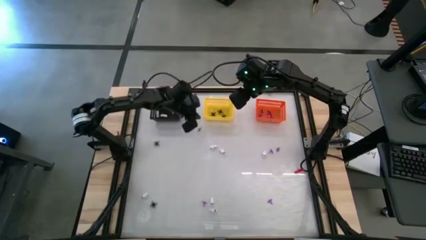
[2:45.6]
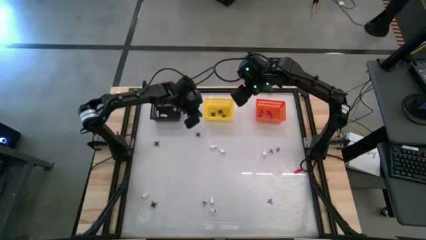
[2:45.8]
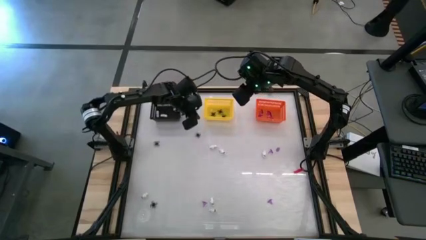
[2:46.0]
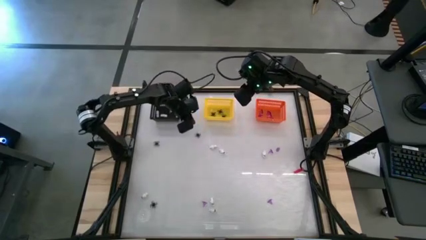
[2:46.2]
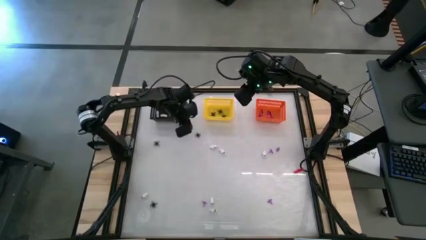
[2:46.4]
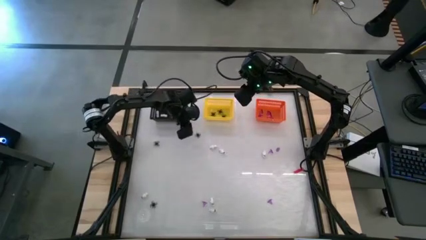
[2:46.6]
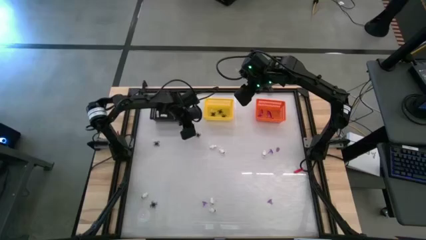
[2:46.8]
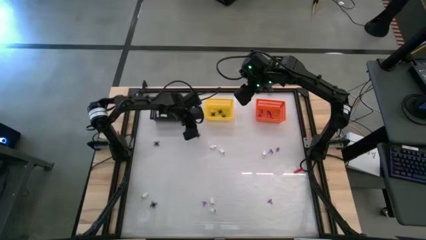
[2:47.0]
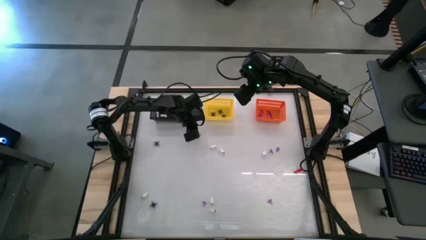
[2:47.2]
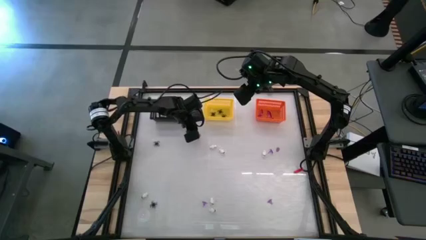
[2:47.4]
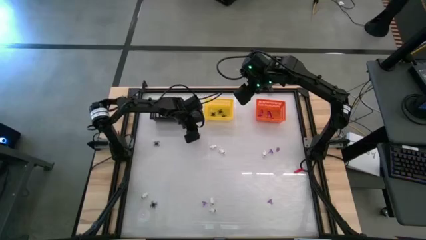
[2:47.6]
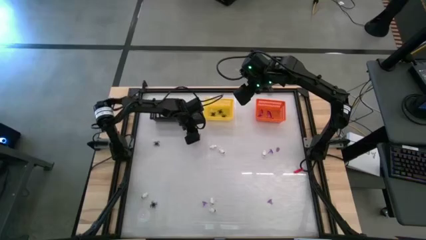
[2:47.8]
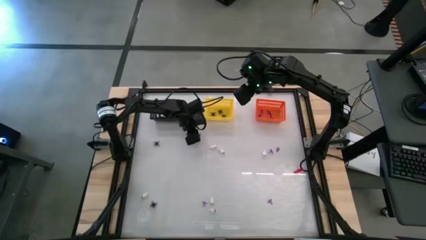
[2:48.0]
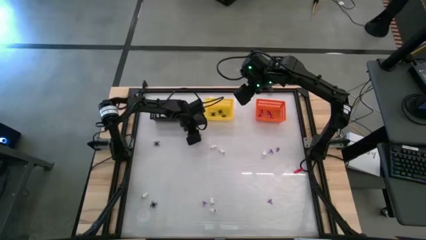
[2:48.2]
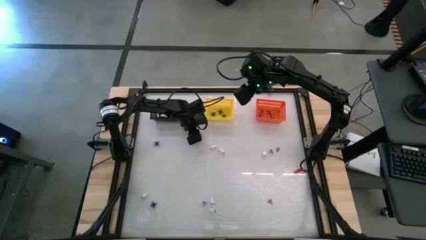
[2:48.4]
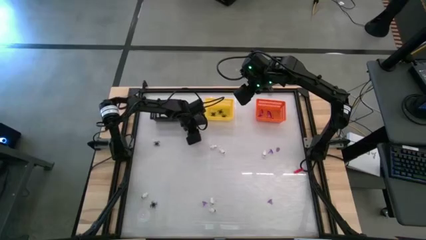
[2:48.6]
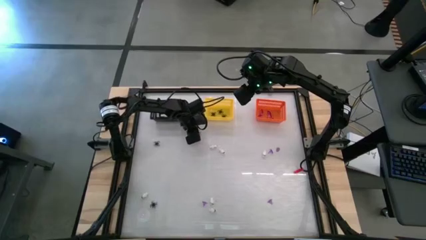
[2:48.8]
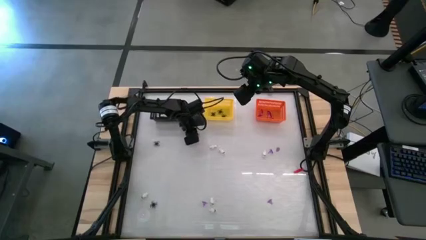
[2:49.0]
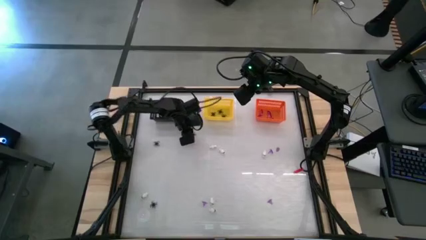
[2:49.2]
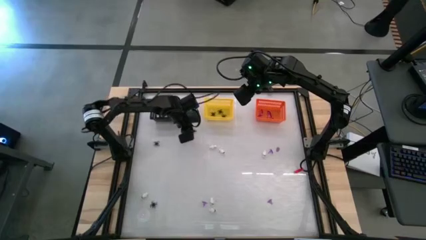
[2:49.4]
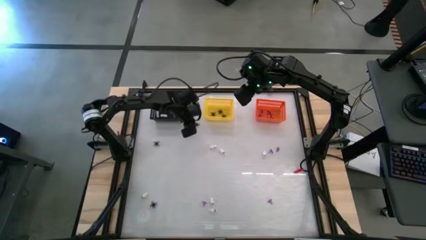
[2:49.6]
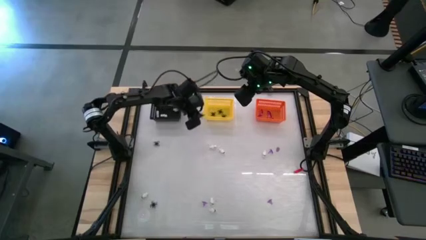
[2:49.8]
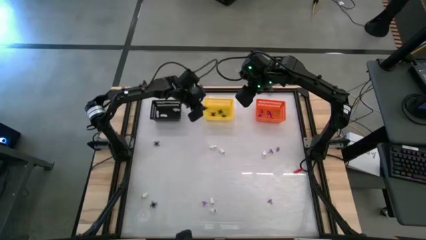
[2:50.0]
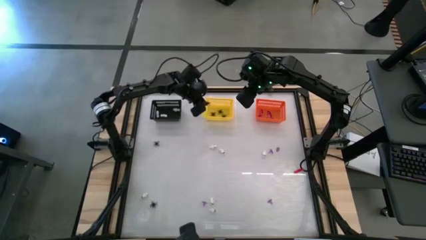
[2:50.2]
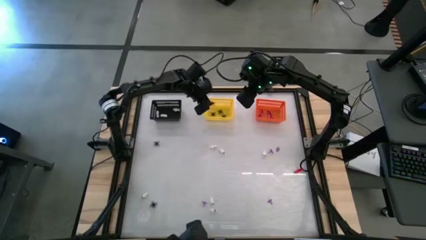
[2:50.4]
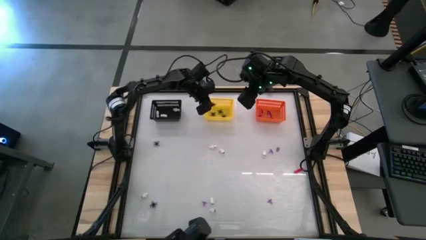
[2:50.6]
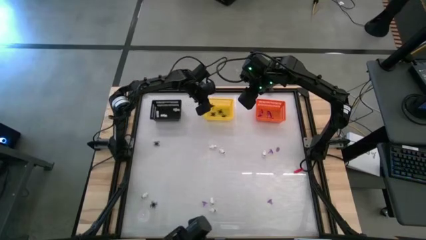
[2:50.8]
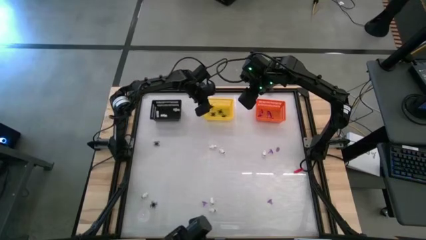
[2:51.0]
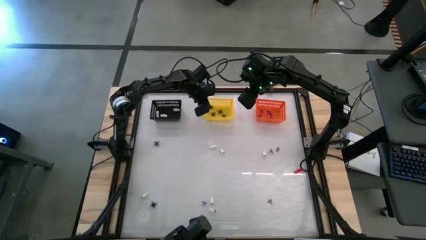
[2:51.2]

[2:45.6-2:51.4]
Task: Sort Halloween decoration
Put the black spider toy into the yellow basket

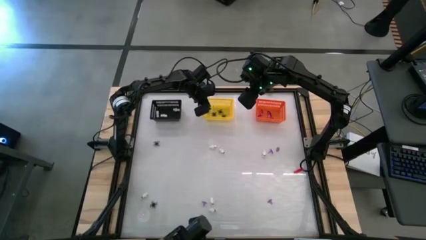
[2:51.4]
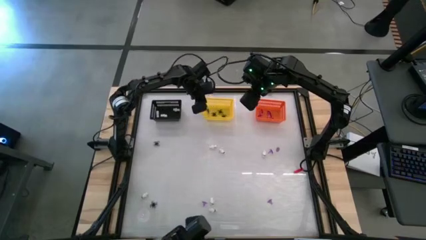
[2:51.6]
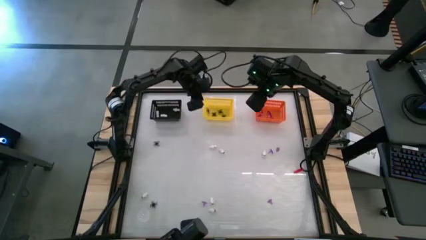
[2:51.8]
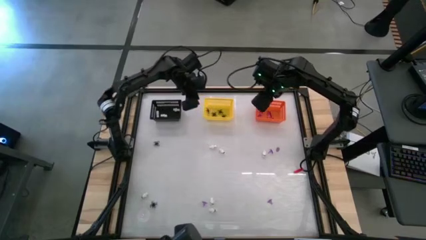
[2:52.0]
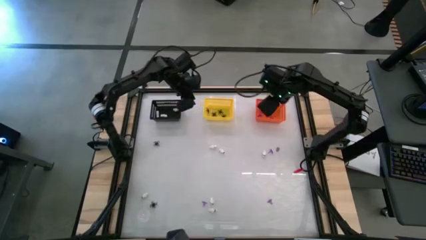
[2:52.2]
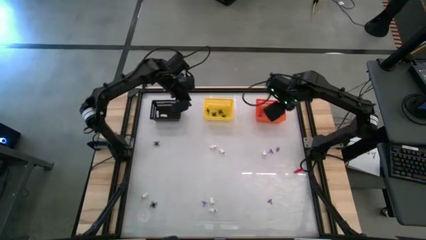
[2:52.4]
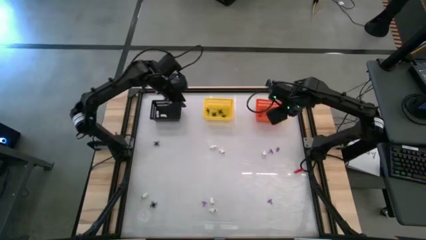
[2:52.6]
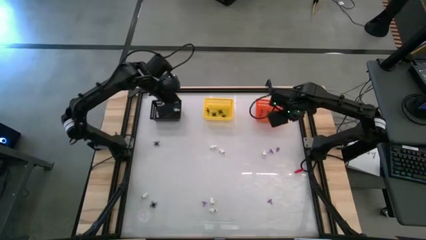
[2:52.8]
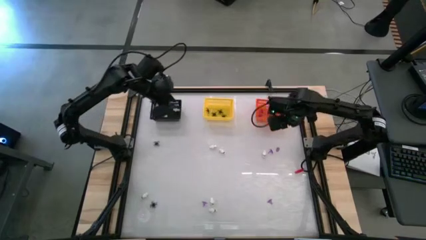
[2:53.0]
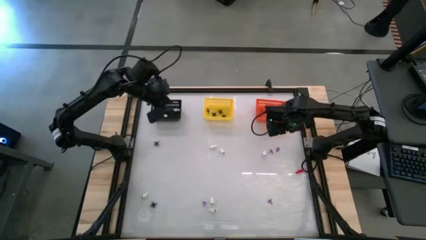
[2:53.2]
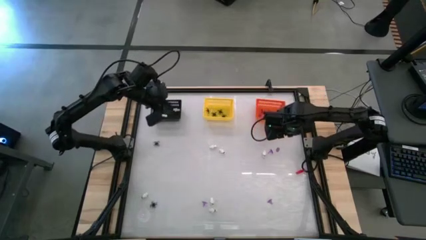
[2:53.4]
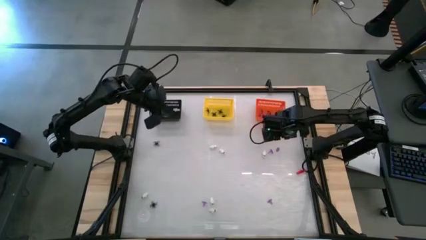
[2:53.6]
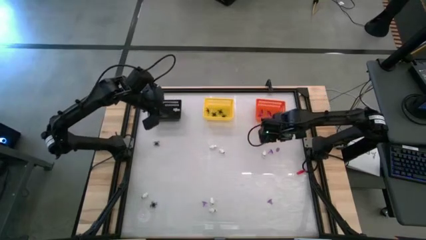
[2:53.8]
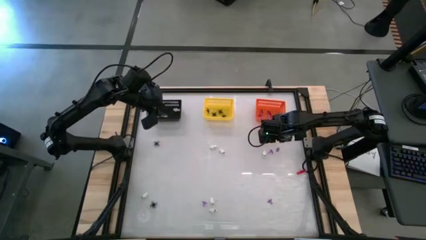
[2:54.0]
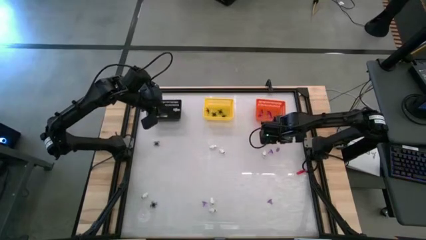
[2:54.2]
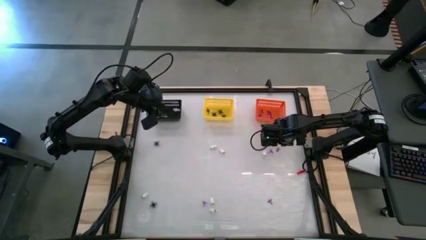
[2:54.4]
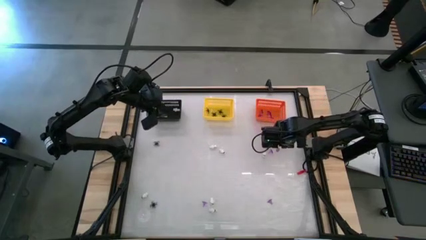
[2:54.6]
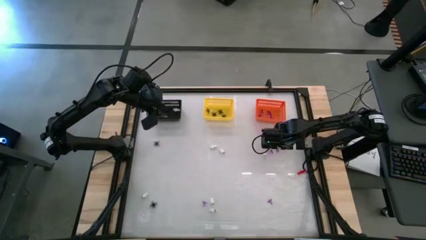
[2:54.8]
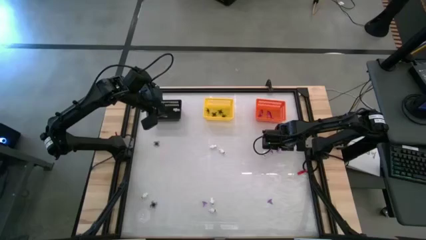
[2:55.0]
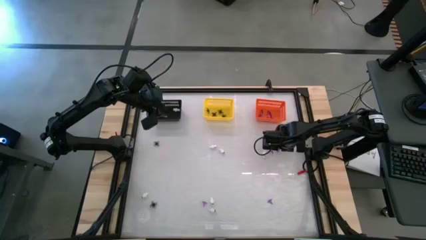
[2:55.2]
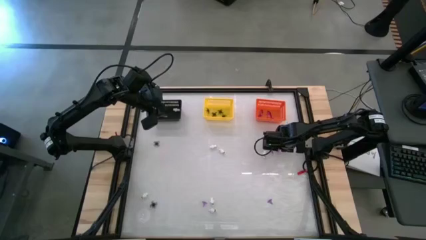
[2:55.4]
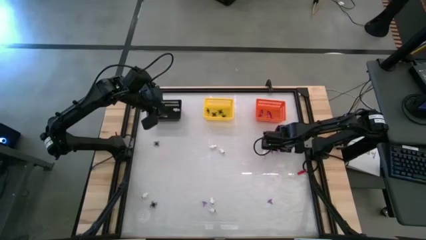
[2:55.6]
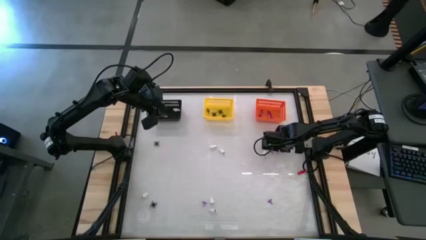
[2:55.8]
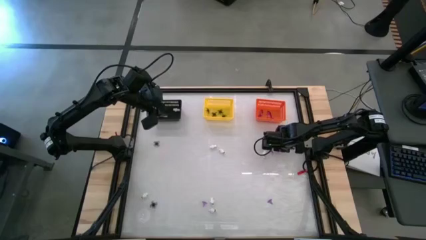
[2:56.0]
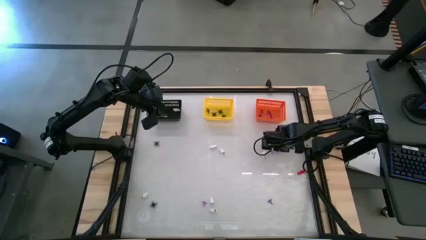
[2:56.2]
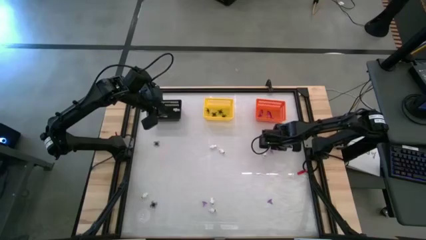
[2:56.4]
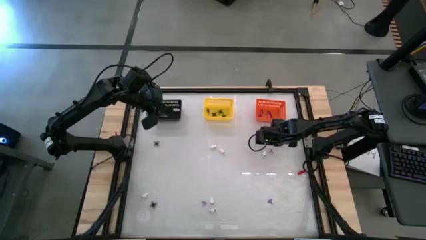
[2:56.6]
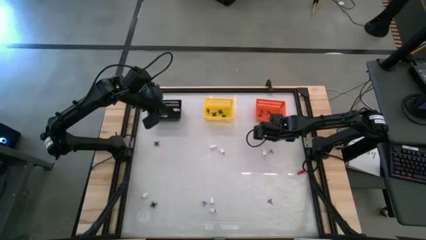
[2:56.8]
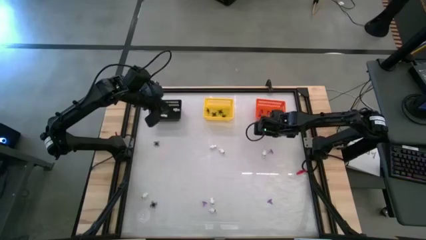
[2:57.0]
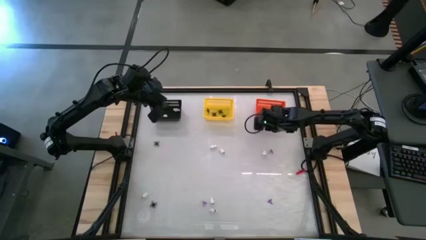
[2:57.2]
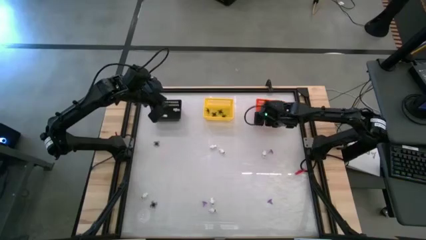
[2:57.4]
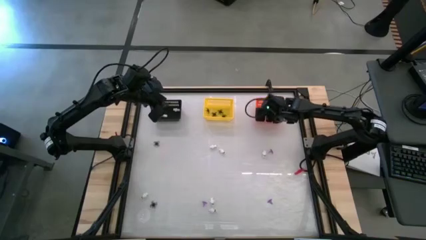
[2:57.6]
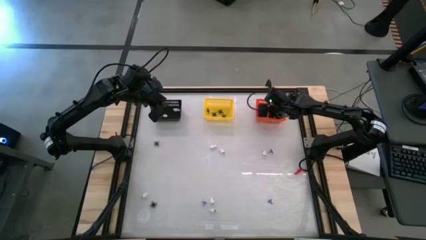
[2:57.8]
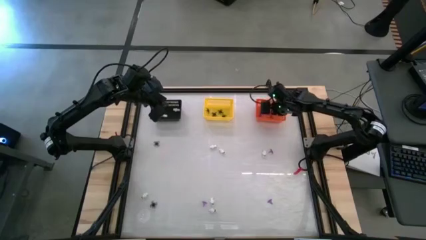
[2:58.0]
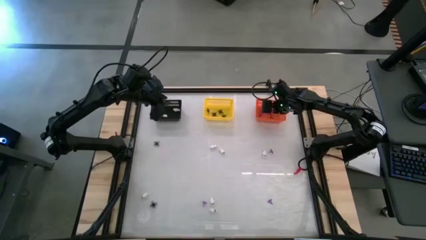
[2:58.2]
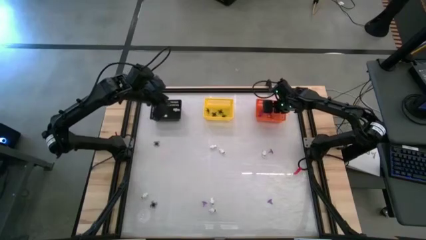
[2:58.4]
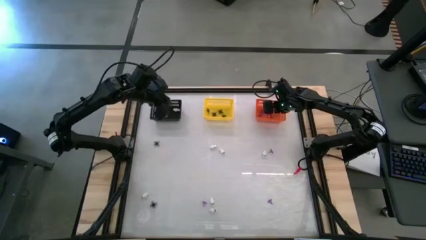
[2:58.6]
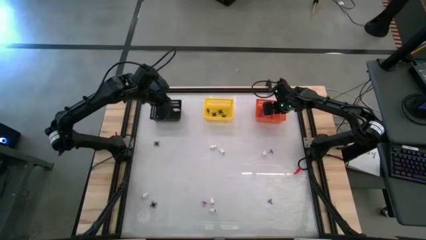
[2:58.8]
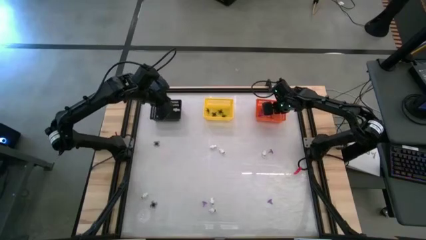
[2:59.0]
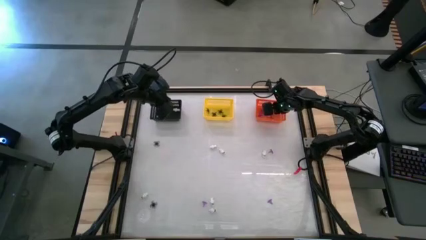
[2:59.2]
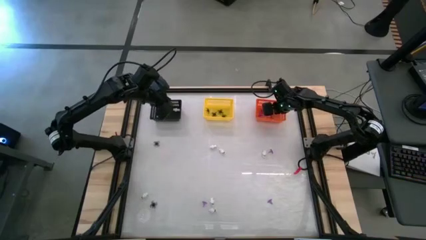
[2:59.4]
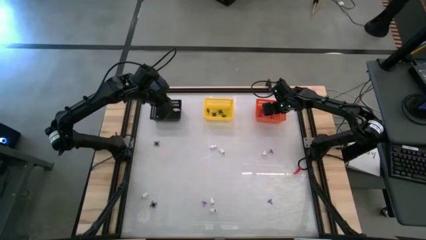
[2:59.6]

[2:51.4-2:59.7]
Put the purple witch hat toy into the orange basket
